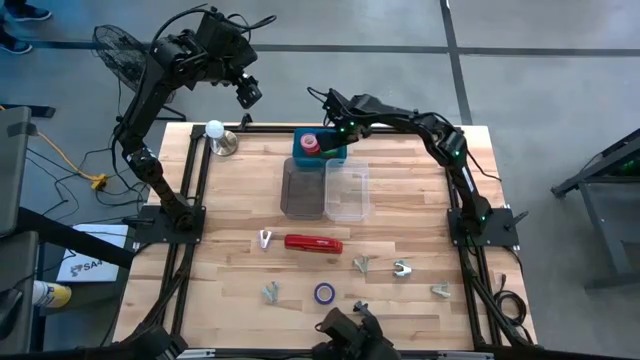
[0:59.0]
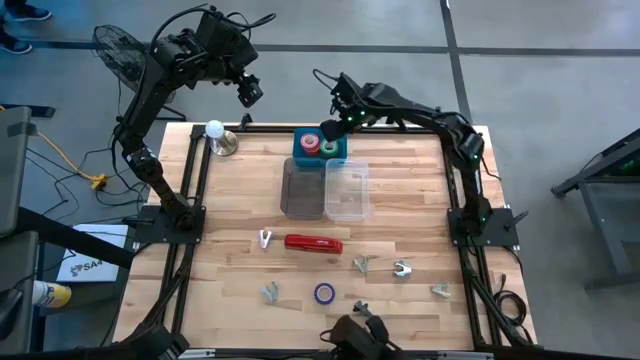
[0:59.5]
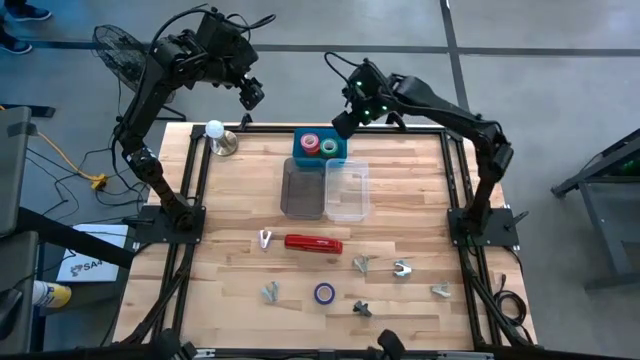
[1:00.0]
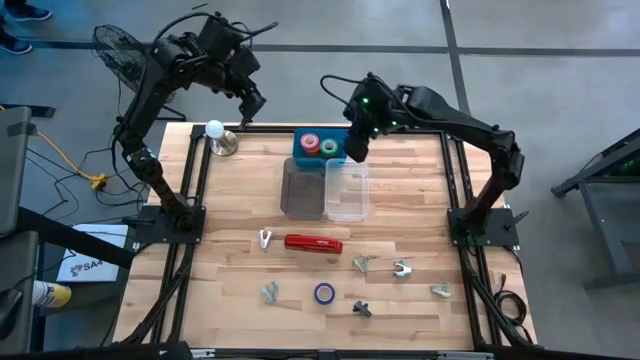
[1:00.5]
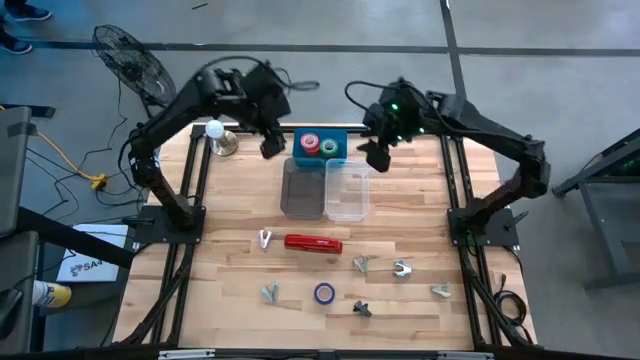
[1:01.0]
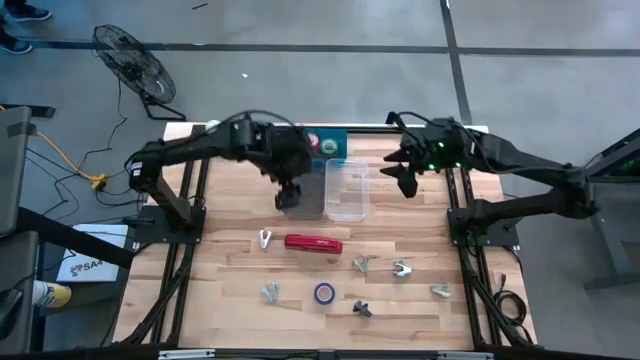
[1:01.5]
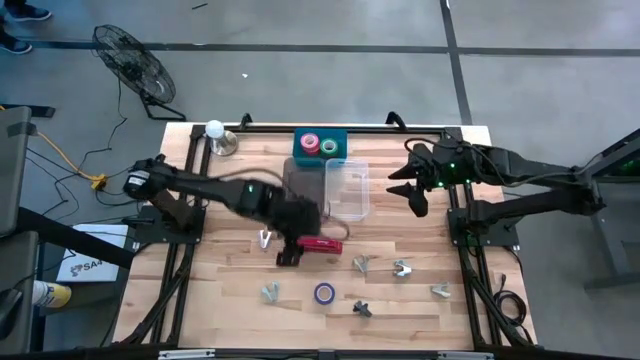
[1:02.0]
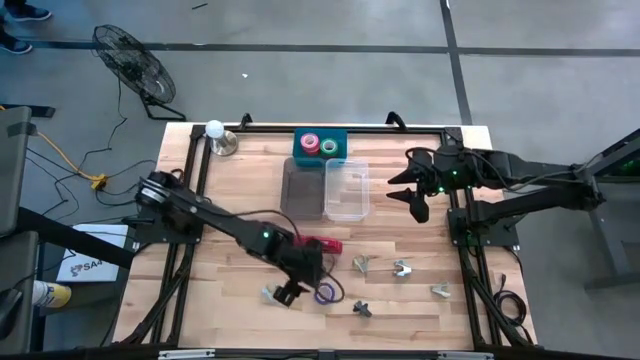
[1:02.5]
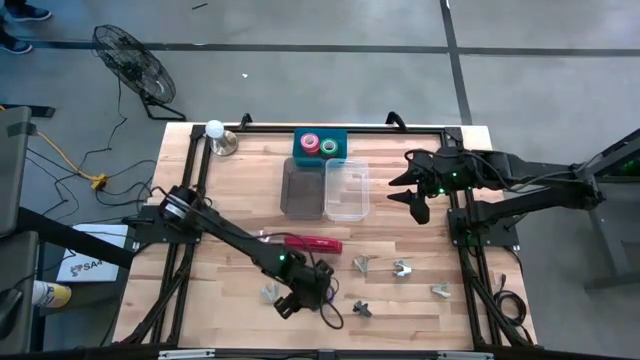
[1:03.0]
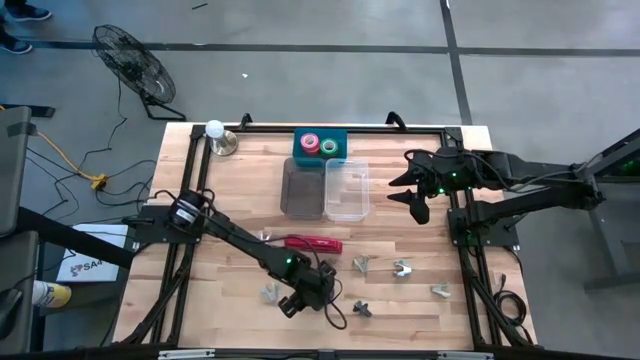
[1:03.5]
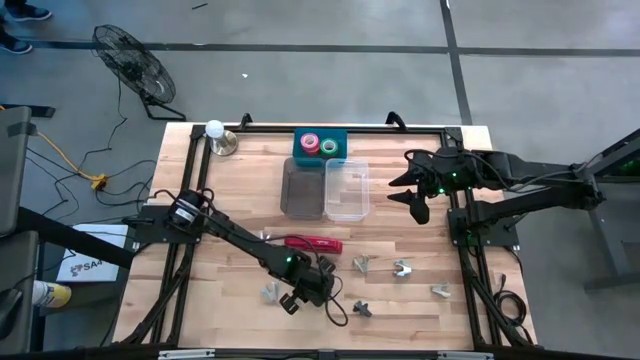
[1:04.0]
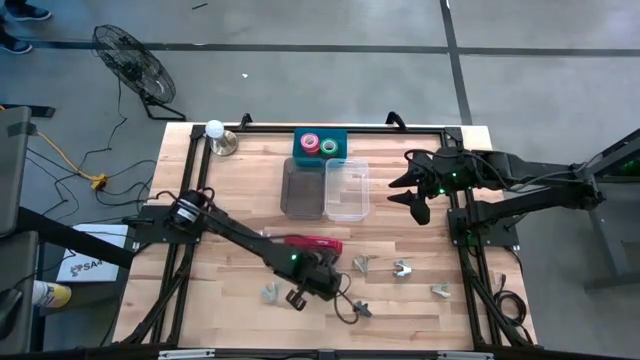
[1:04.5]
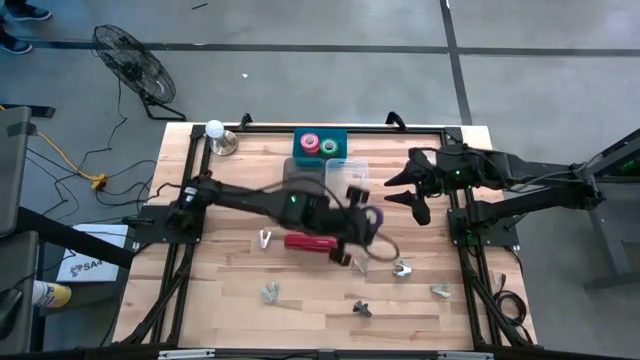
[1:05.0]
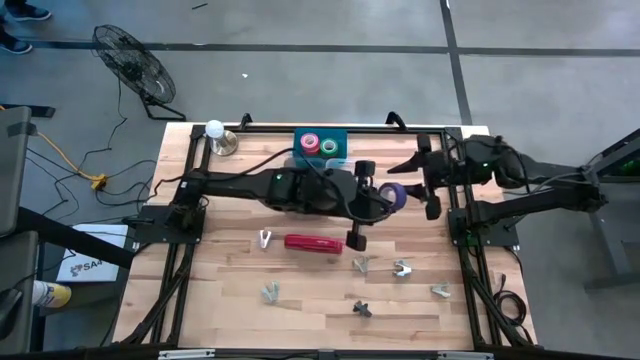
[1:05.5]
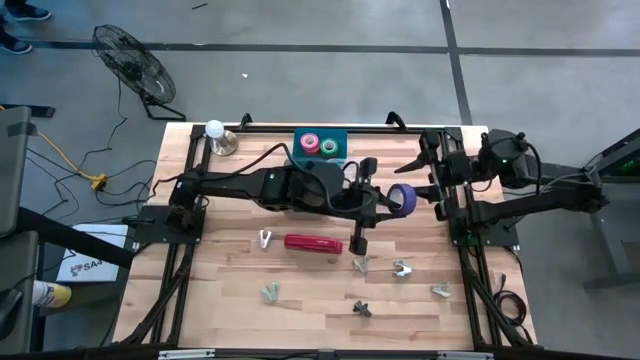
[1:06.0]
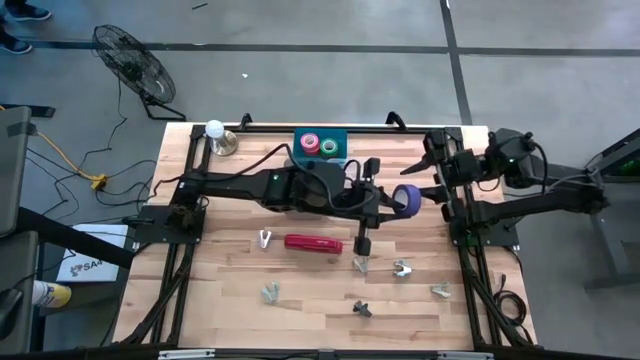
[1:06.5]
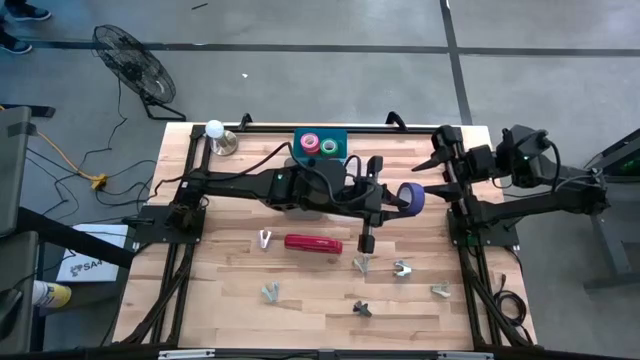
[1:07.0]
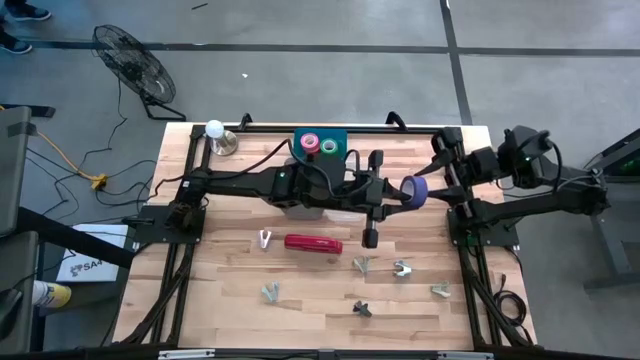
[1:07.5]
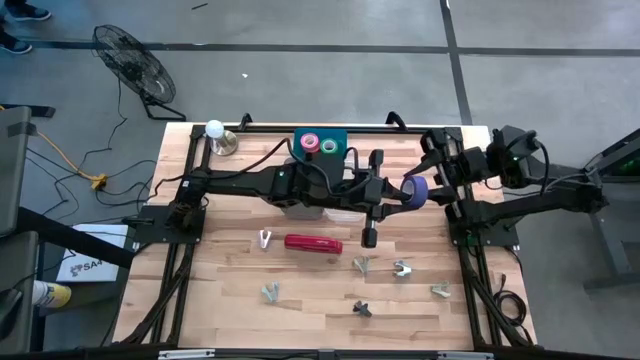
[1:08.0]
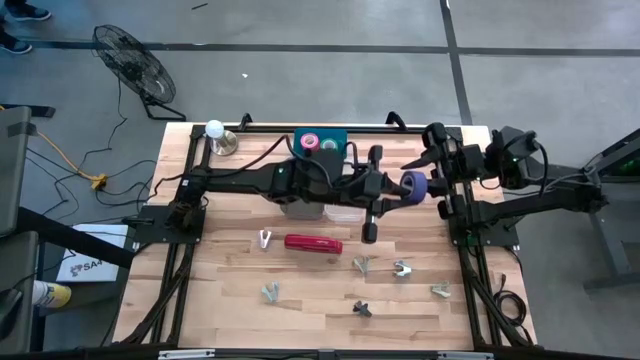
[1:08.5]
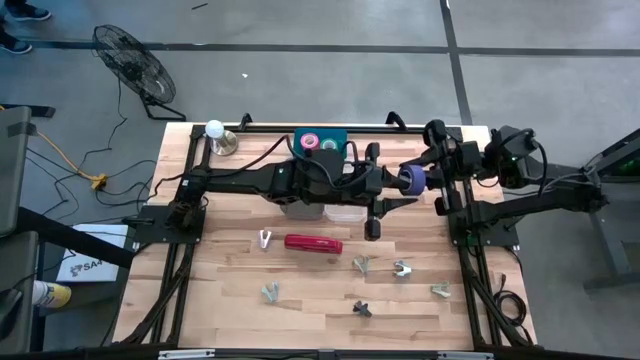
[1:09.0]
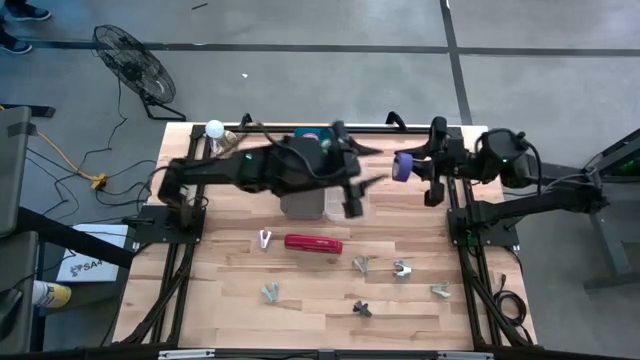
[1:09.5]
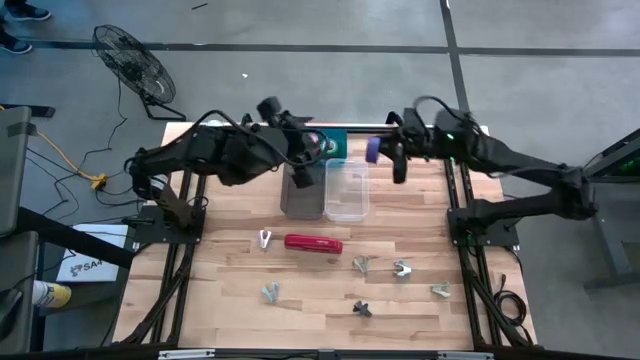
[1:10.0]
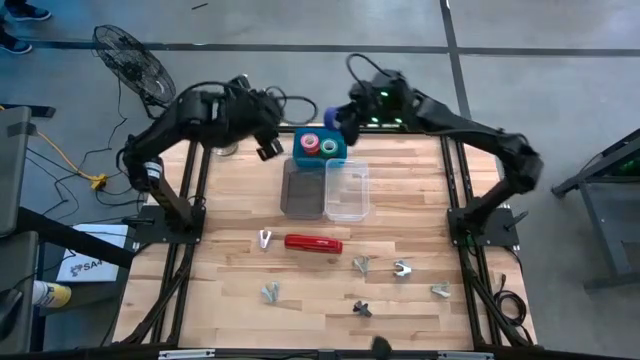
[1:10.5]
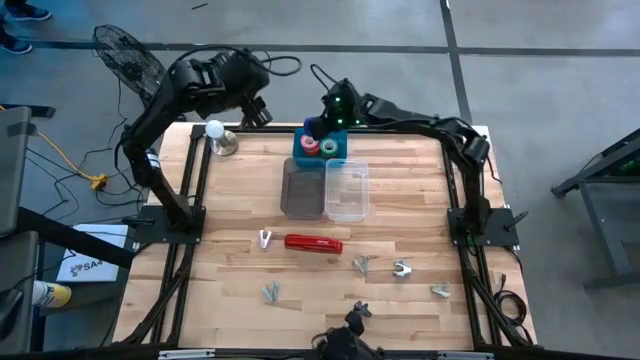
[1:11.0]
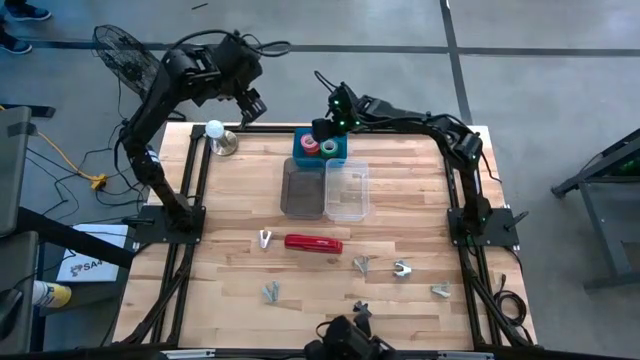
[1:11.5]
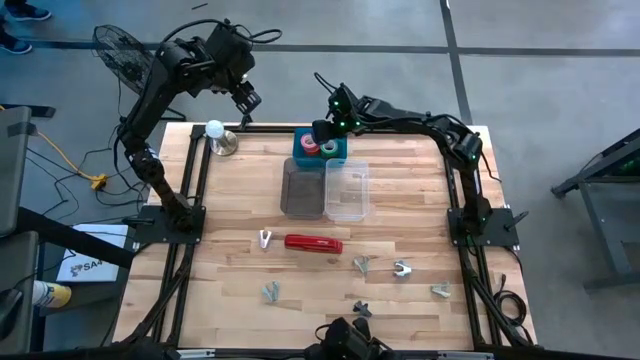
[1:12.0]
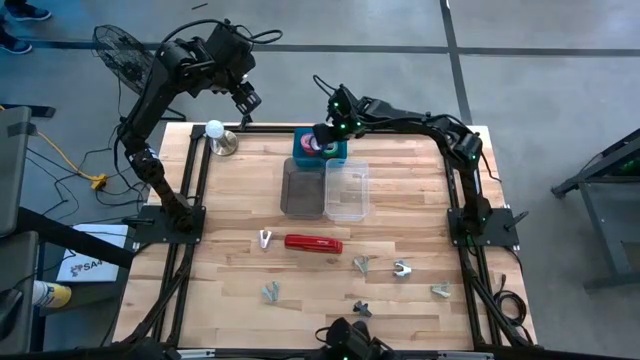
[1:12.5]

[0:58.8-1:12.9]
Task: Pick and place Stapler, Stapler remover, tape
Put the violet tape into the blue bin

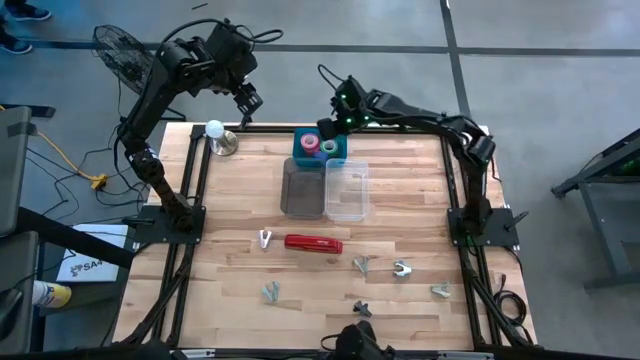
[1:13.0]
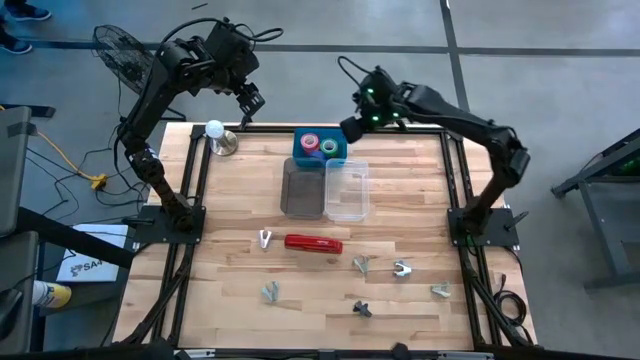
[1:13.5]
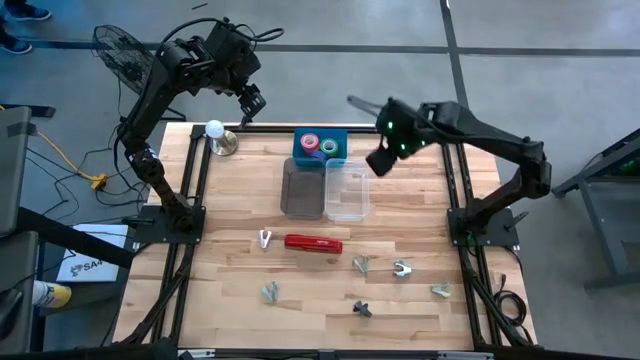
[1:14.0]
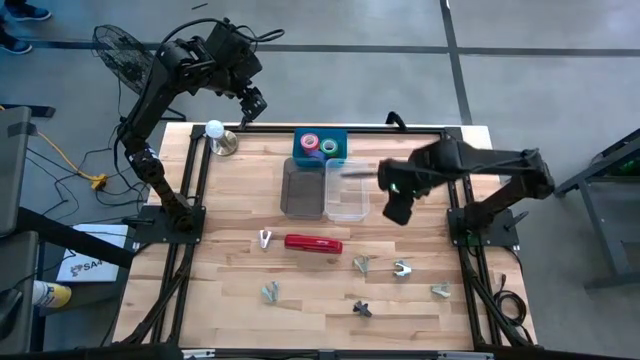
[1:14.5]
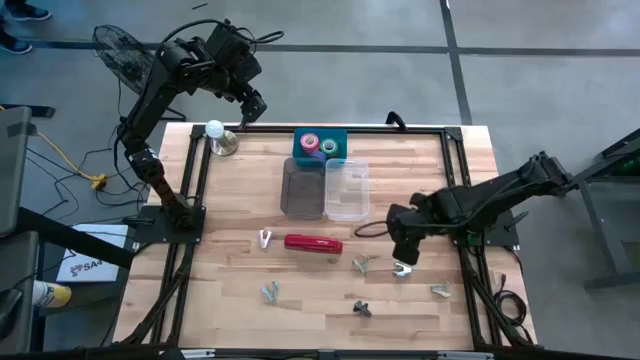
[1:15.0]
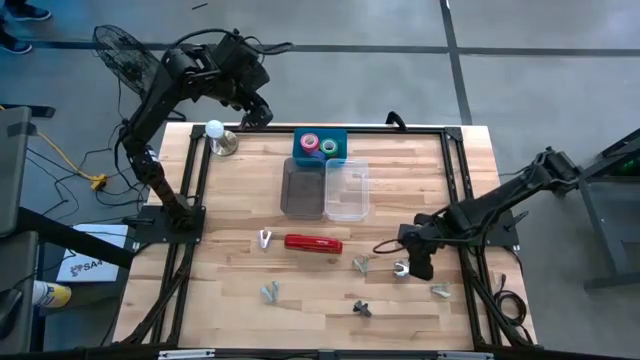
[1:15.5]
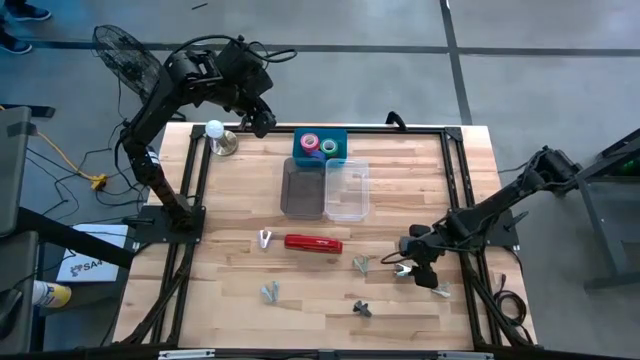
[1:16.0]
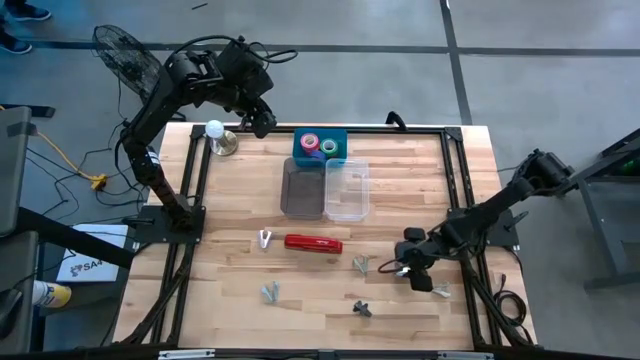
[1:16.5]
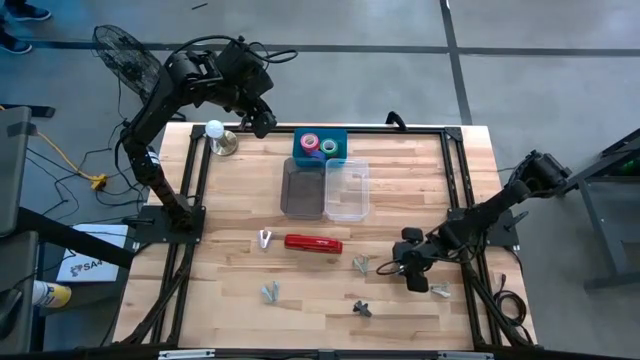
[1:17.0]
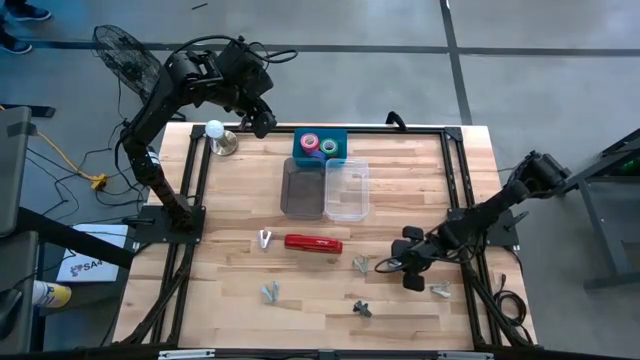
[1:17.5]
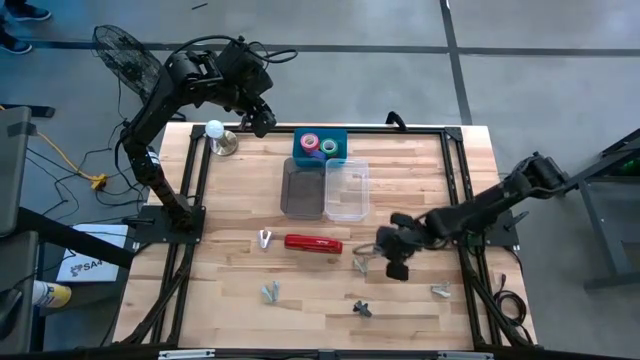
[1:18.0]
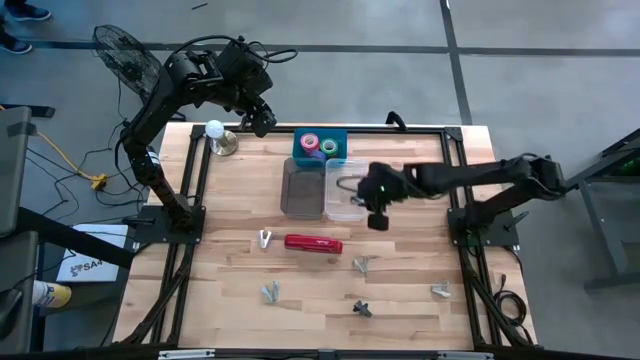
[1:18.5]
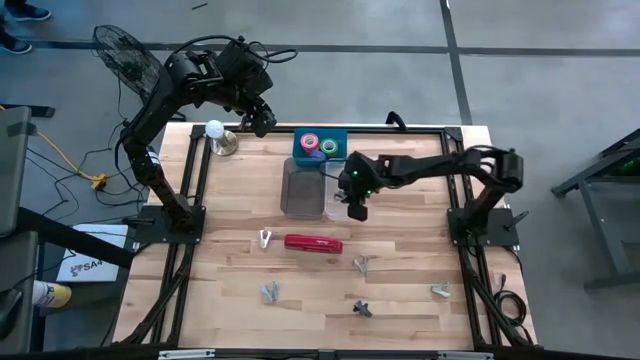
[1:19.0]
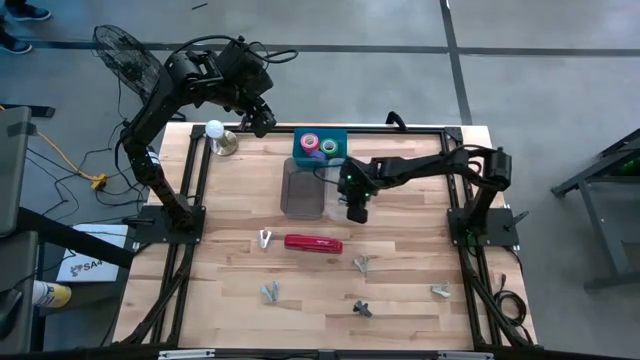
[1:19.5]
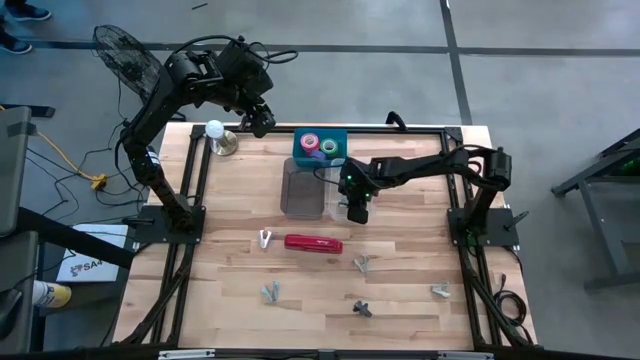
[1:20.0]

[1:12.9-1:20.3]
Put the right blue staple remover into the transparent bin

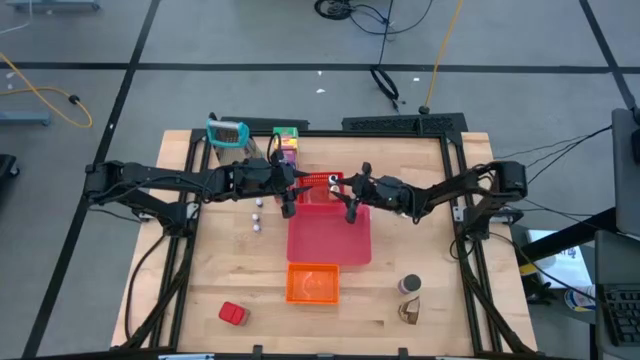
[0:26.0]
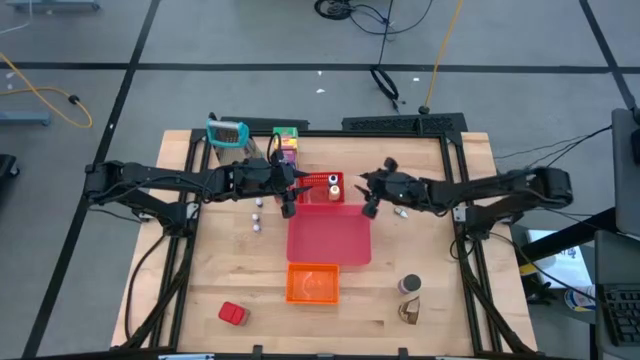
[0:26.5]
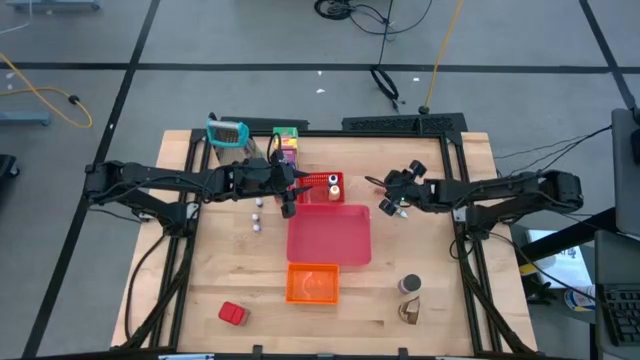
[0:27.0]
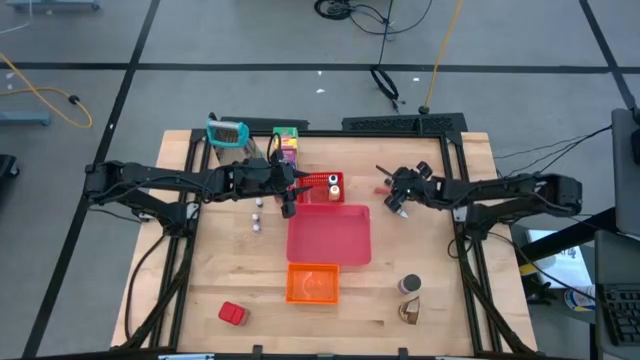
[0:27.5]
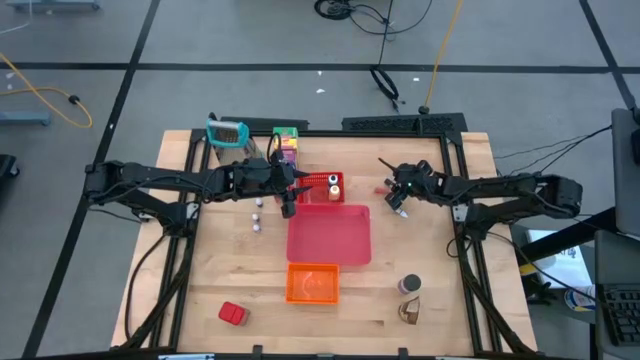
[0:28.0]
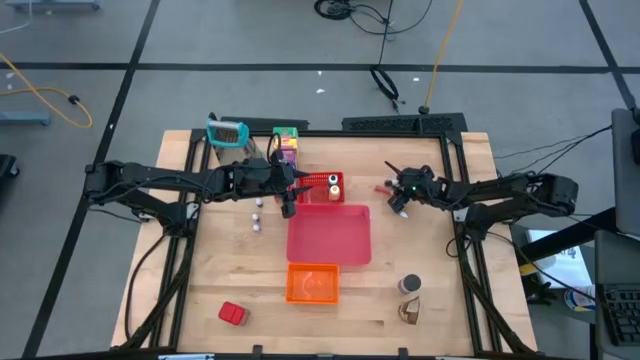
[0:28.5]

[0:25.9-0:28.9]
Task: Pick & Place Kitchen Items
Put the violet food coloring bottle into the red bin
